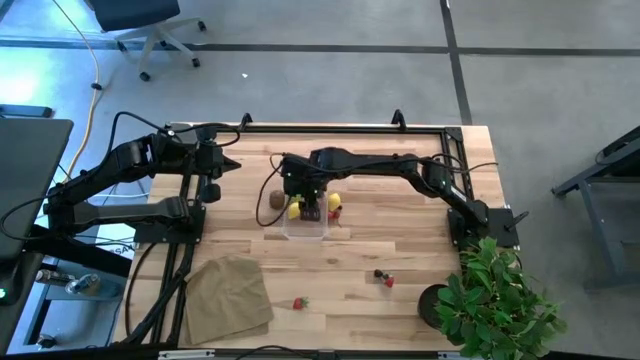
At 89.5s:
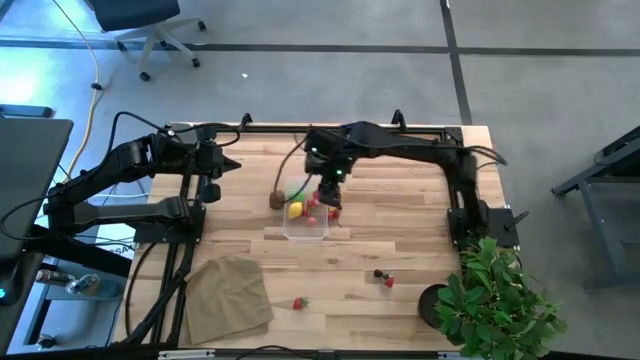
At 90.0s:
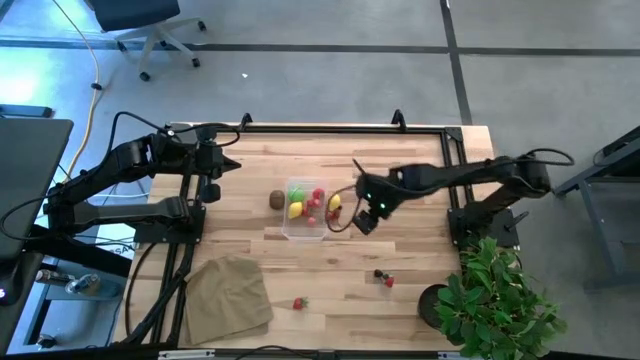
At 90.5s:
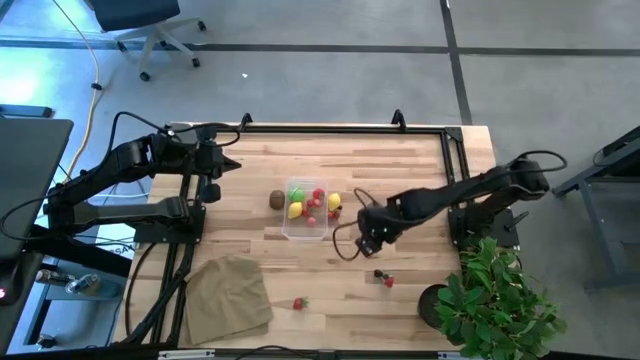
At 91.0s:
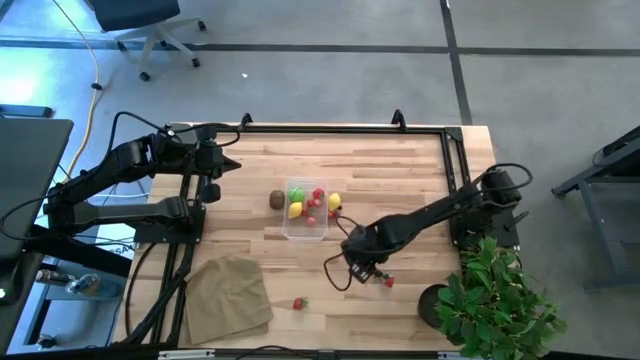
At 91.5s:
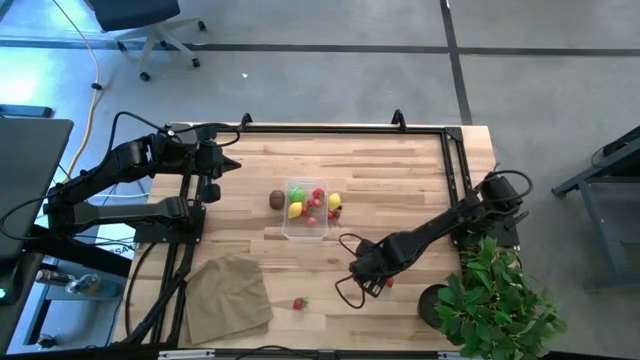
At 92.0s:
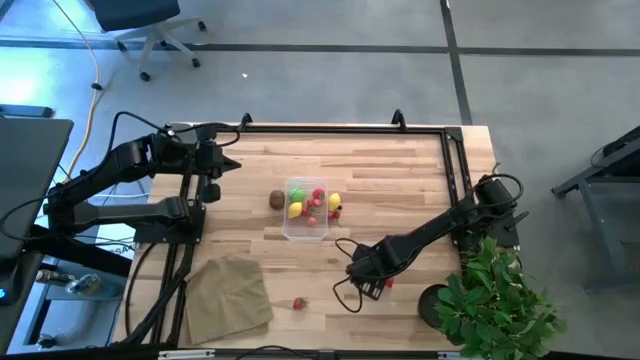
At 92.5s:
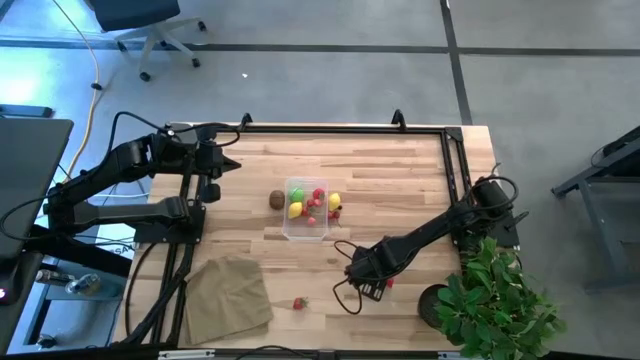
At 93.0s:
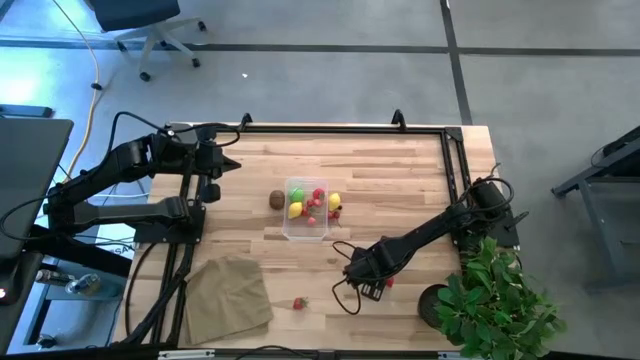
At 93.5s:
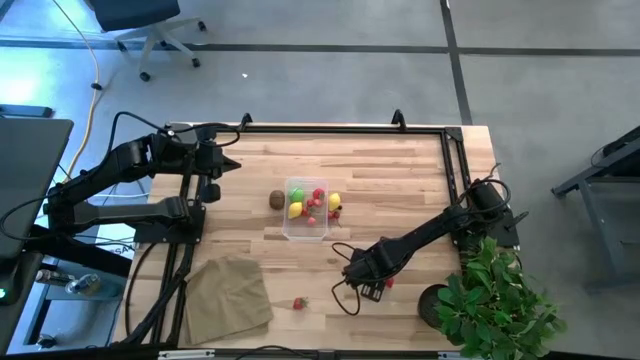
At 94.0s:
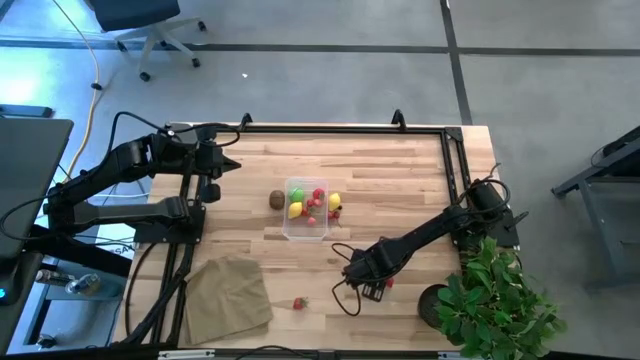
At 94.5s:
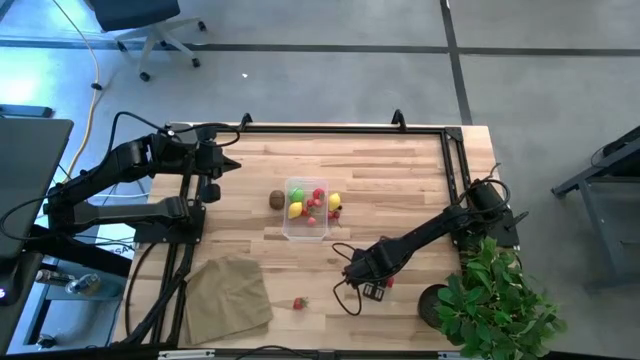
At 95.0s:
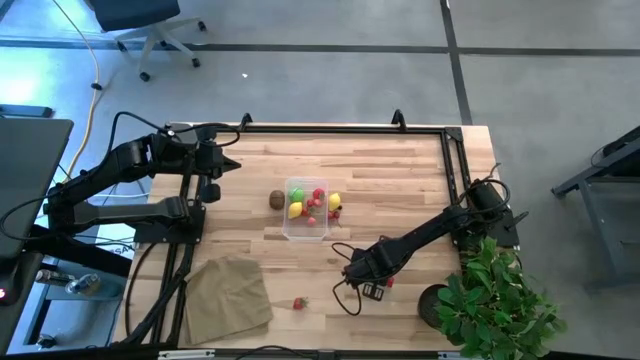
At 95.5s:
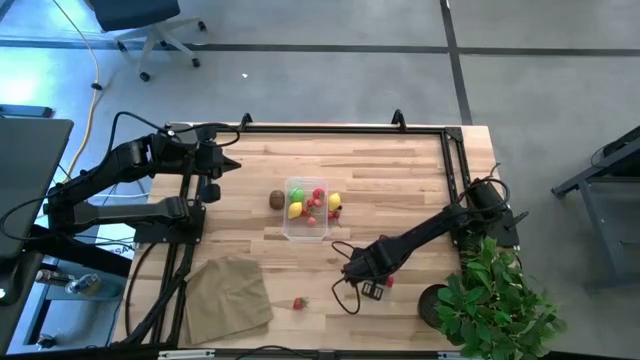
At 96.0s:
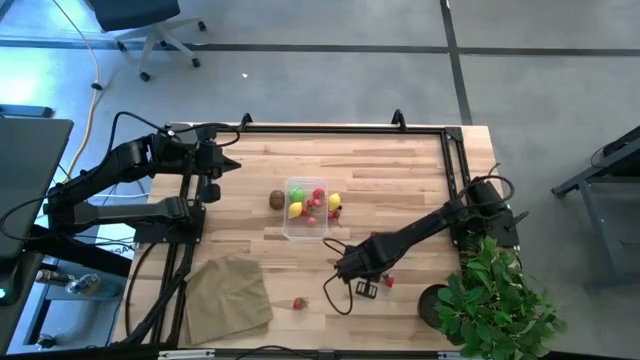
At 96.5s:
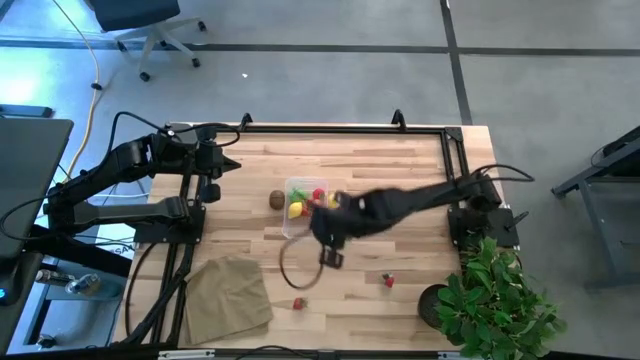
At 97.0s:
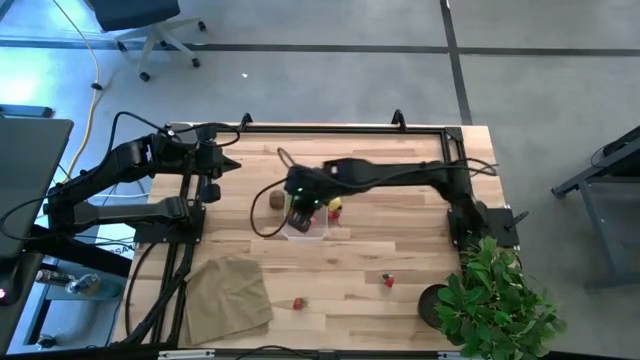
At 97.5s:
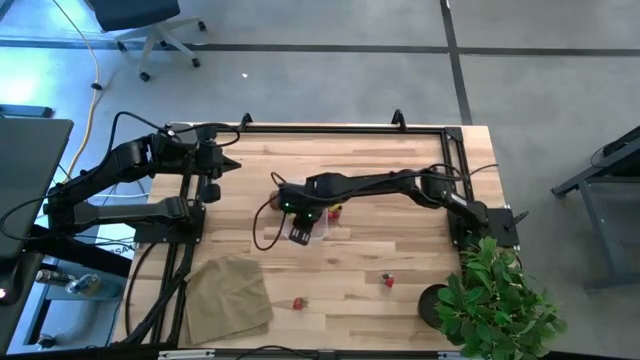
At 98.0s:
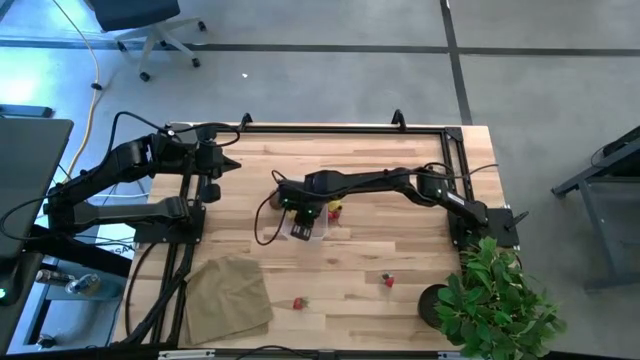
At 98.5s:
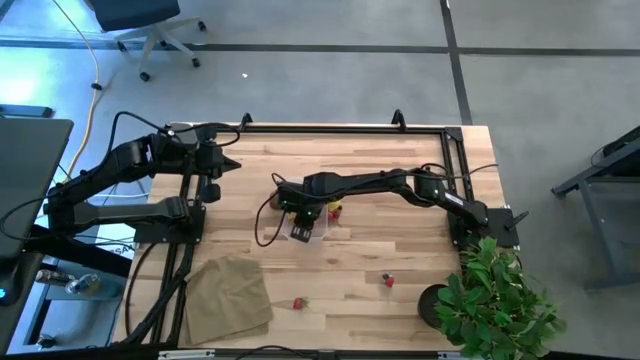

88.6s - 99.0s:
Task: Pick and placing Produce into tupperware
Put the blackberry into the transparent bin

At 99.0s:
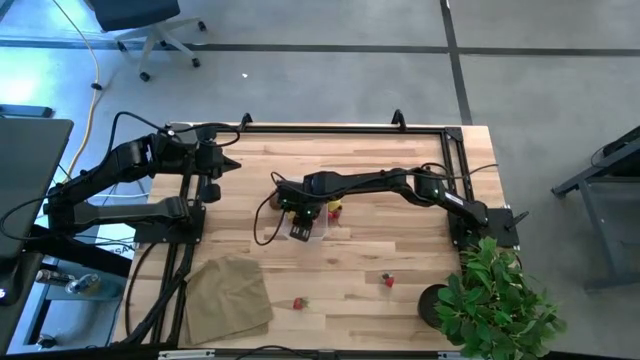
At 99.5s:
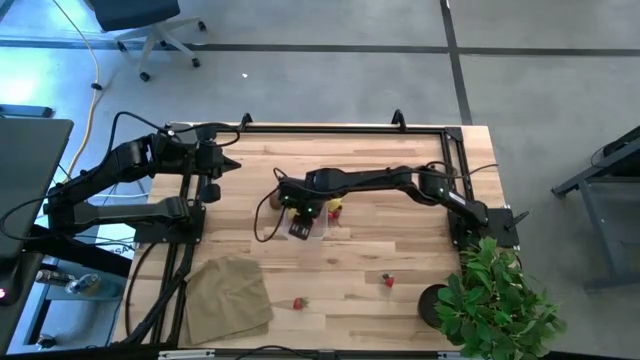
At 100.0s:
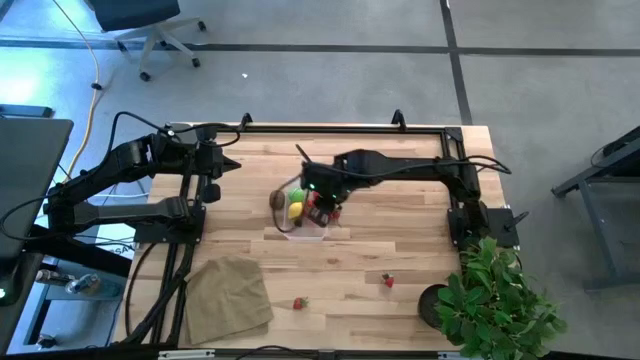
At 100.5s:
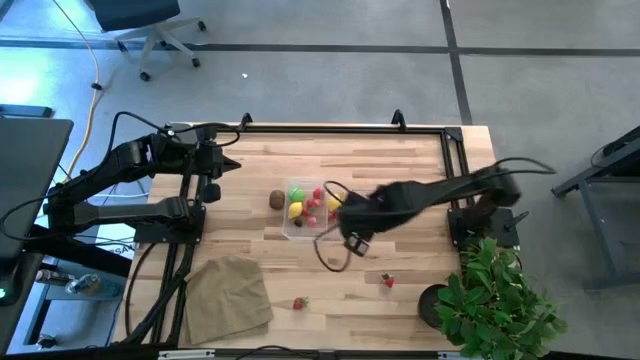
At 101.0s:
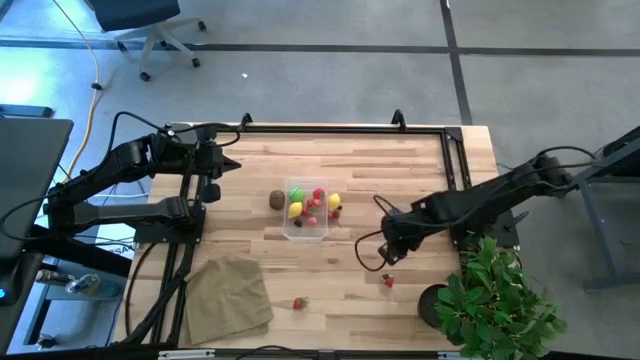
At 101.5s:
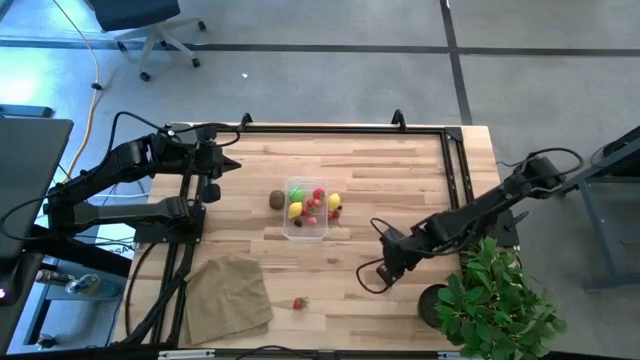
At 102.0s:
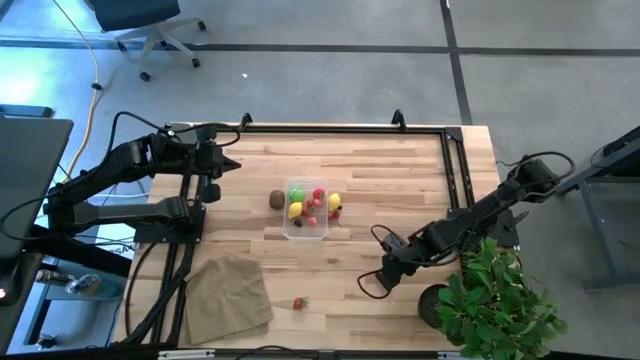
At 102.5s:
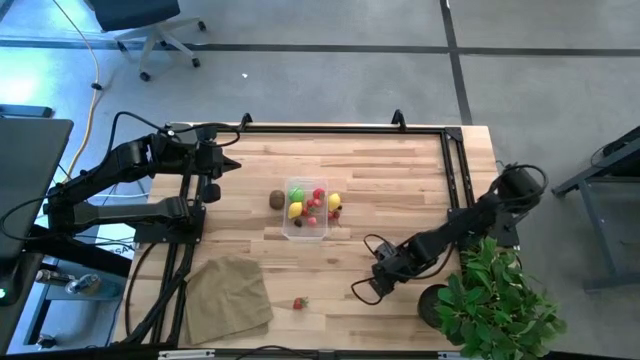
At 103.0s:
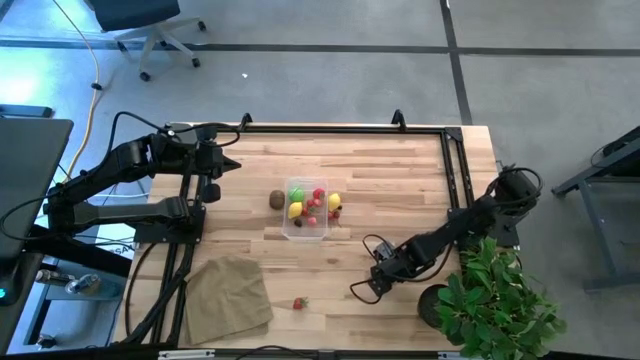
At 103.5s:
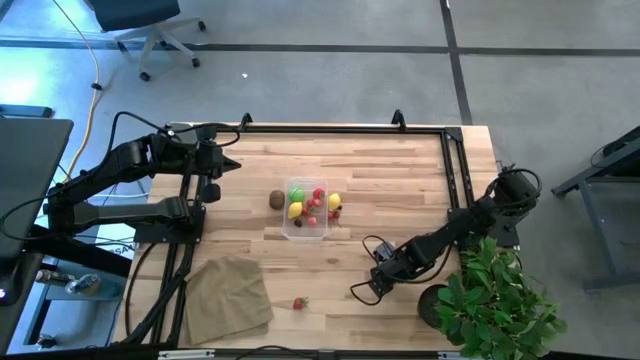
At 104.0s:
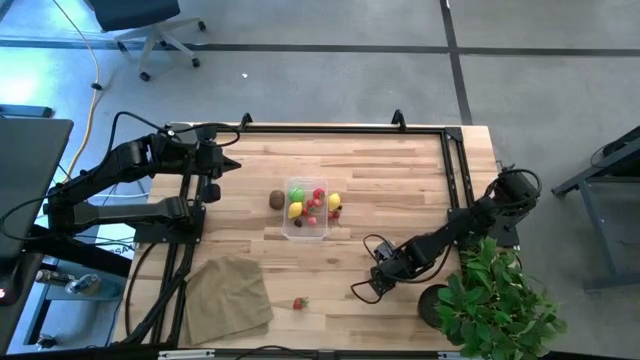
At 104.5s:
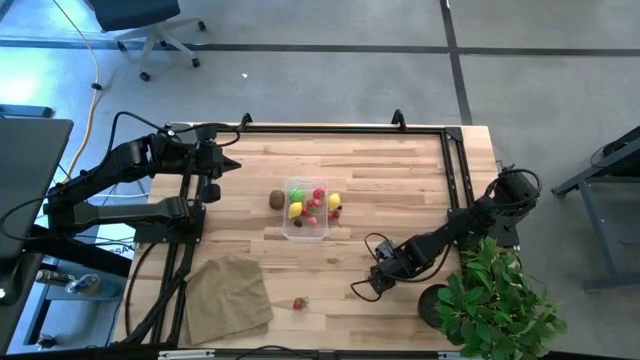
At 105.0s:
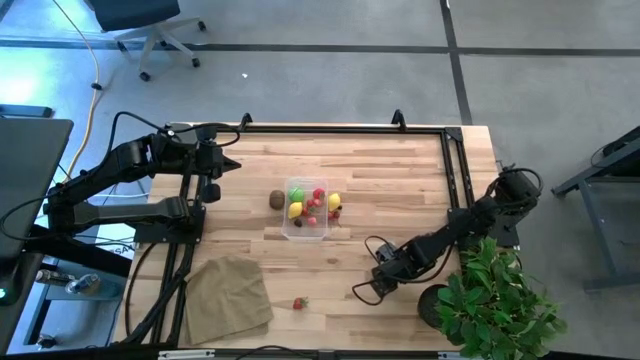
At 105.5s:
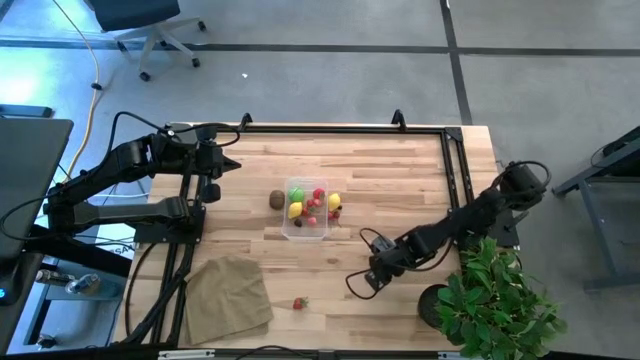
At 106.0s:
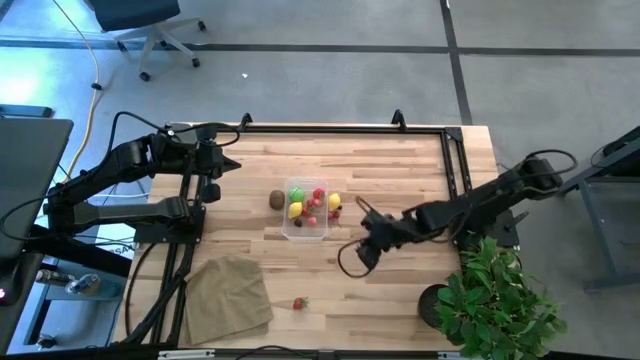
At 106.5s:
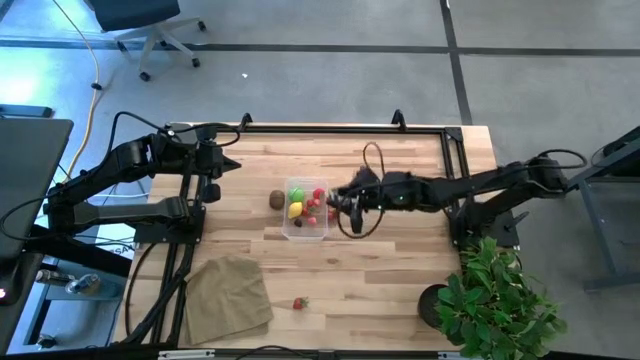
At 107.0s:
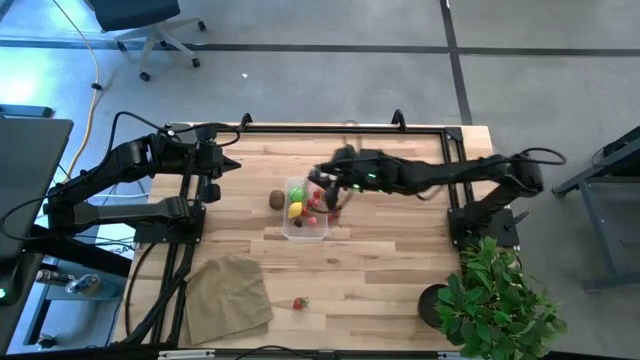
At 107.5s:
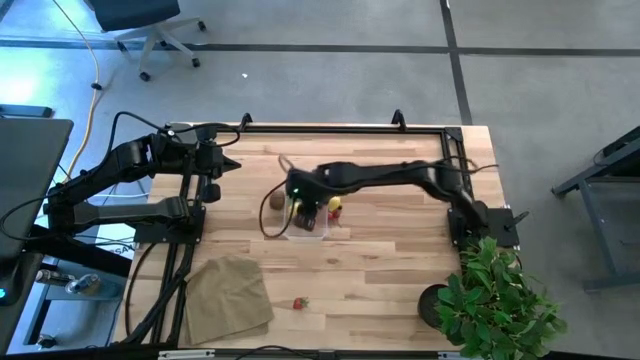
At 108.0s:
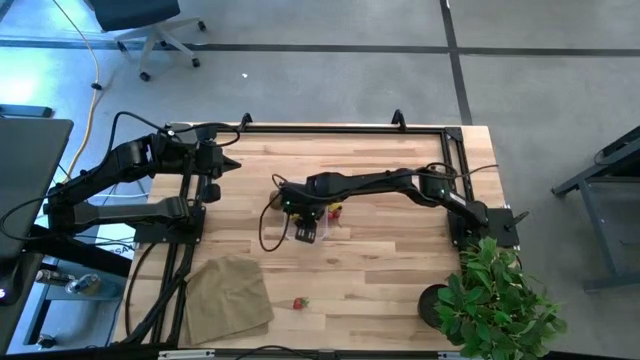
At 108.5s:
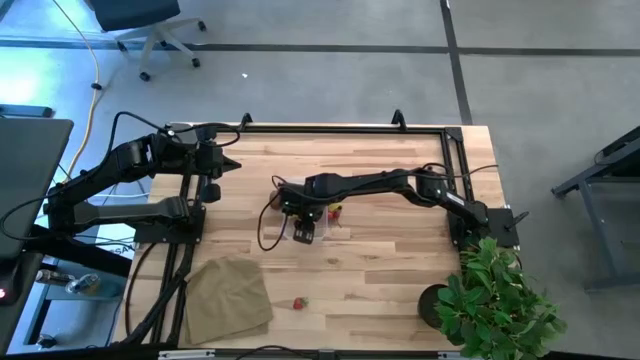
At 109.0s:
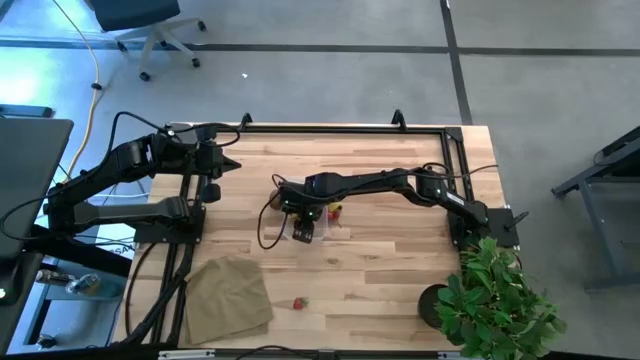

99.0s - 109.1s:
Put the strawberry into the transparent bin

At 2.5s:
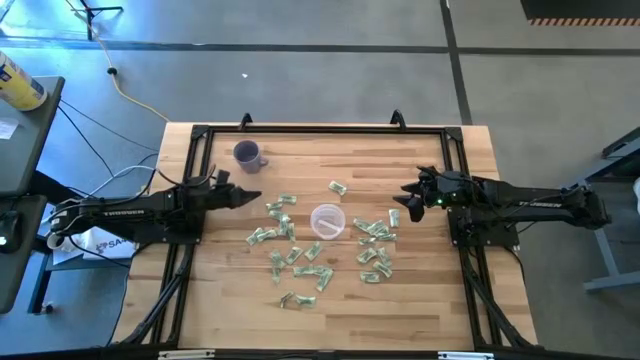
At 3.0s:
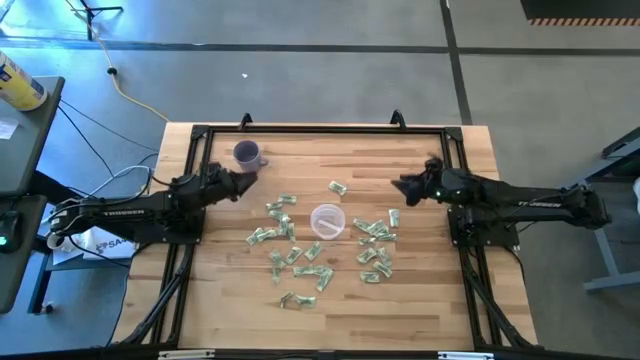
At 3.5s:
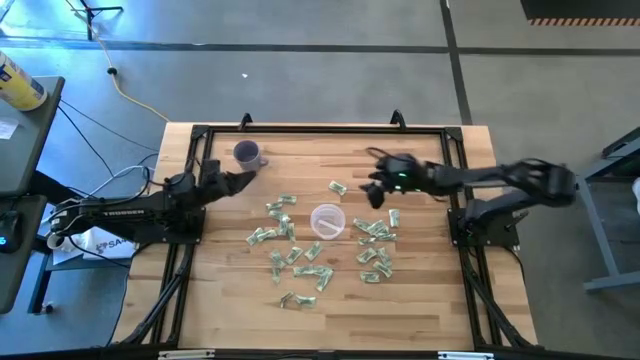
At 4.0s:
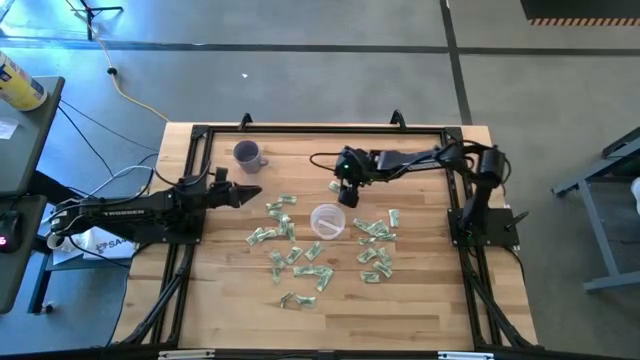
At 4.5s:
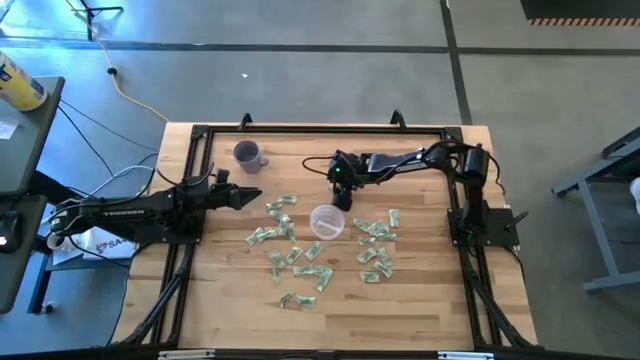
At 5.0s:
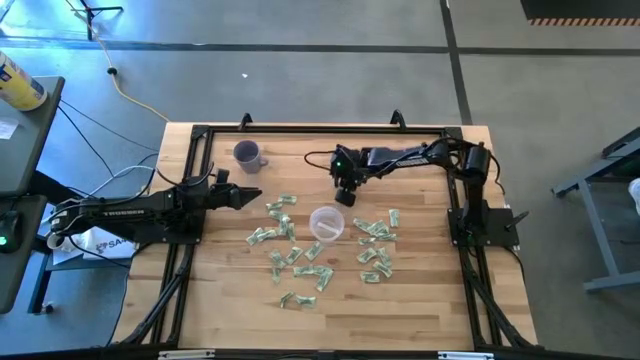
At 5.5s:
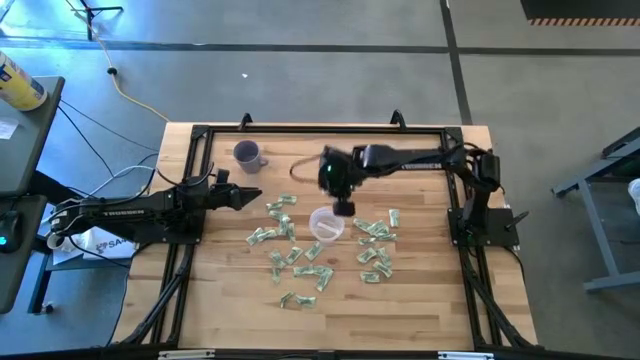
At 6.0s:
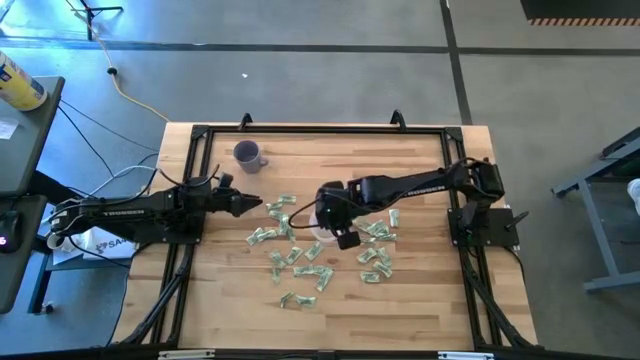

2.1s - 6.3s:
Task: Pick and place Stevia / Truvia into bins
Put the stevia packet into the transparent container
